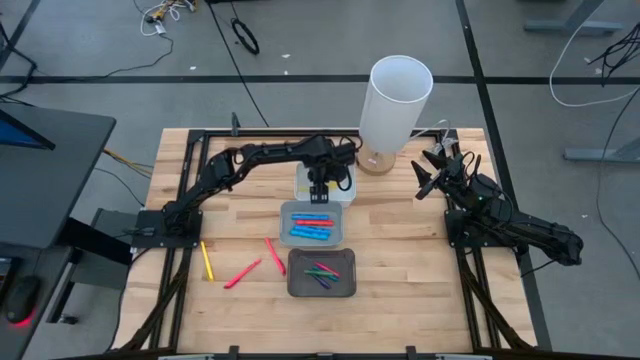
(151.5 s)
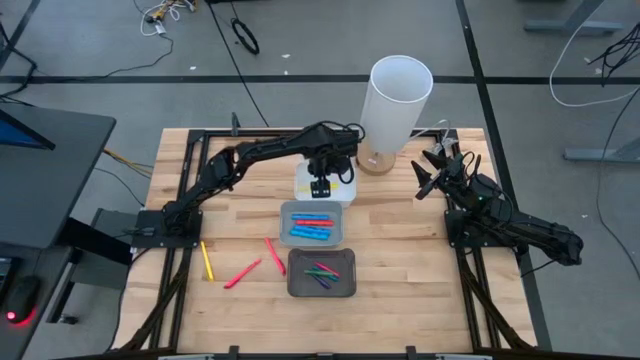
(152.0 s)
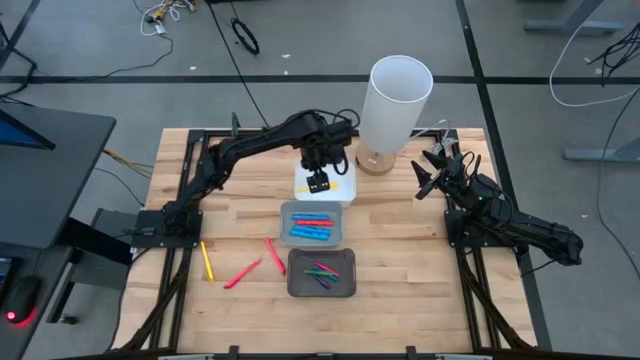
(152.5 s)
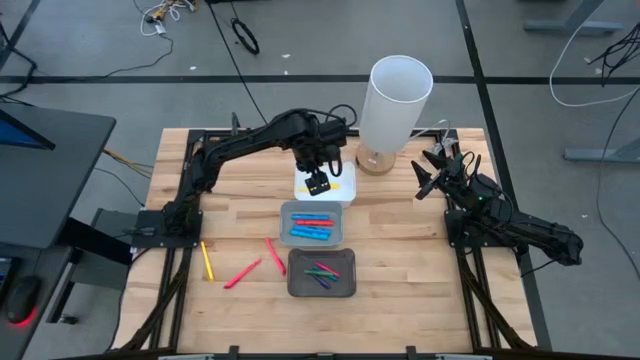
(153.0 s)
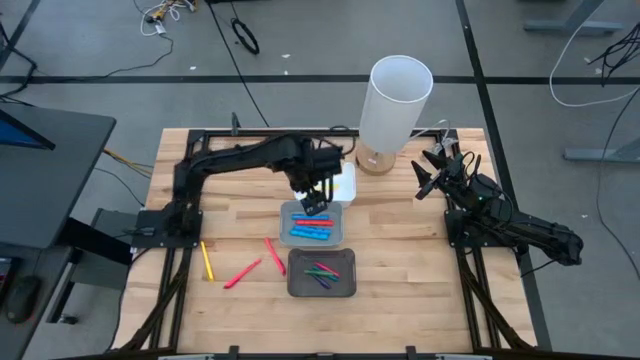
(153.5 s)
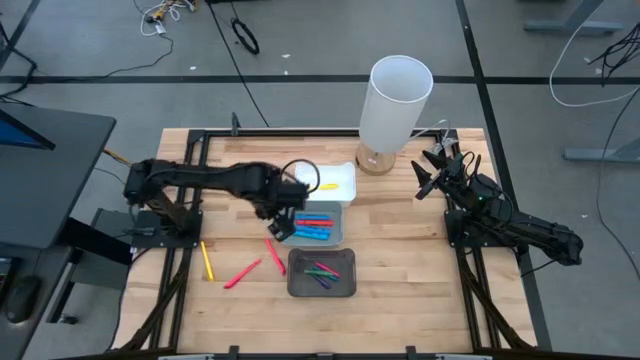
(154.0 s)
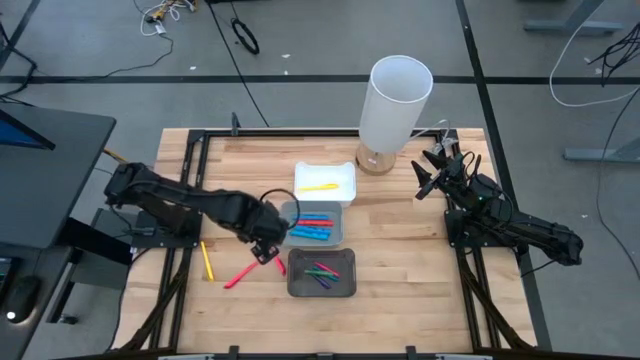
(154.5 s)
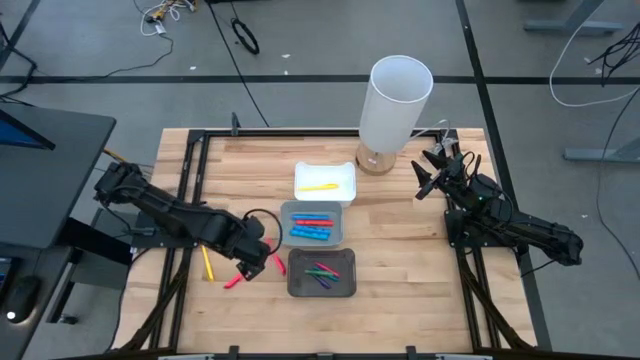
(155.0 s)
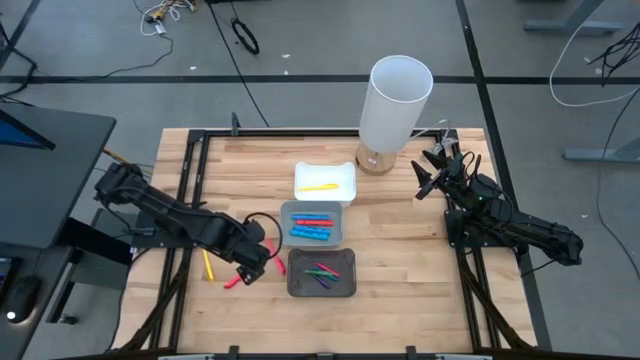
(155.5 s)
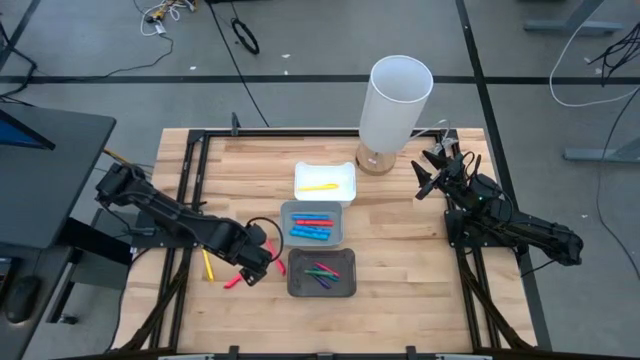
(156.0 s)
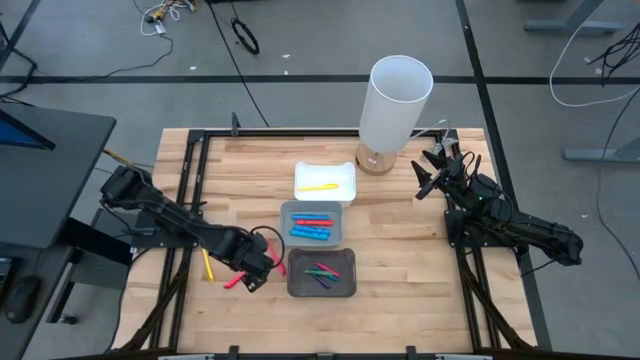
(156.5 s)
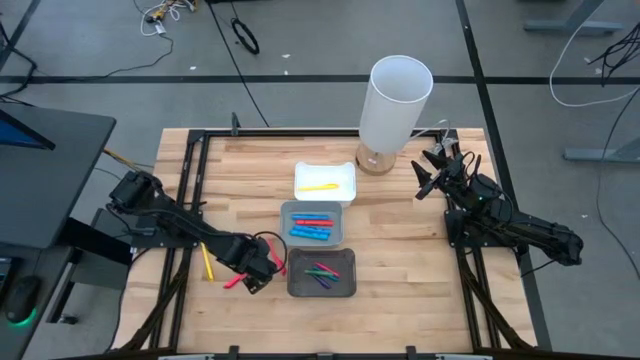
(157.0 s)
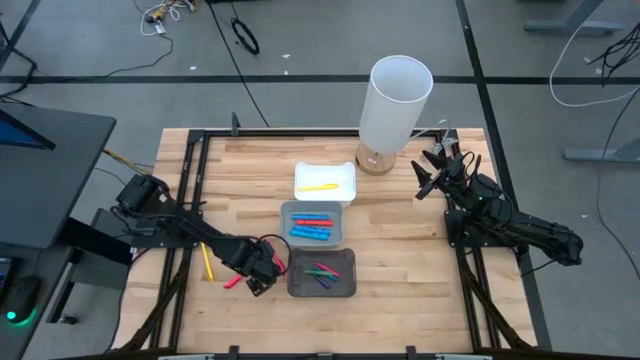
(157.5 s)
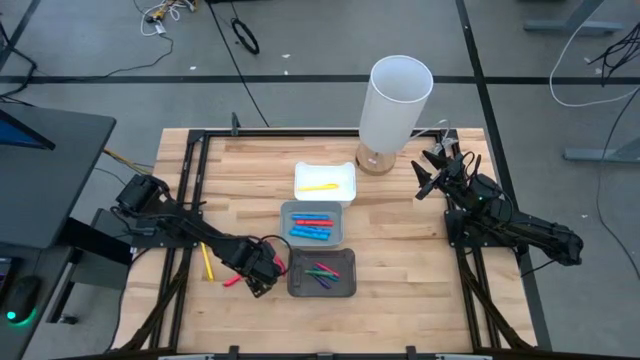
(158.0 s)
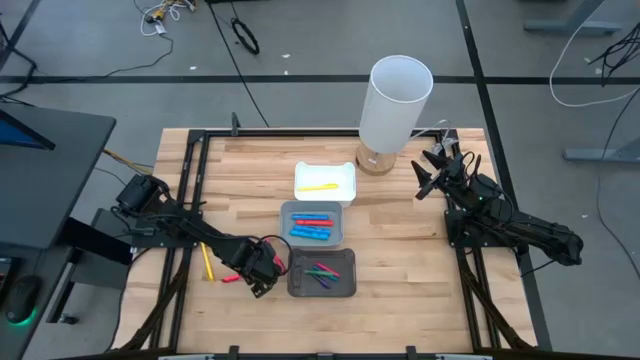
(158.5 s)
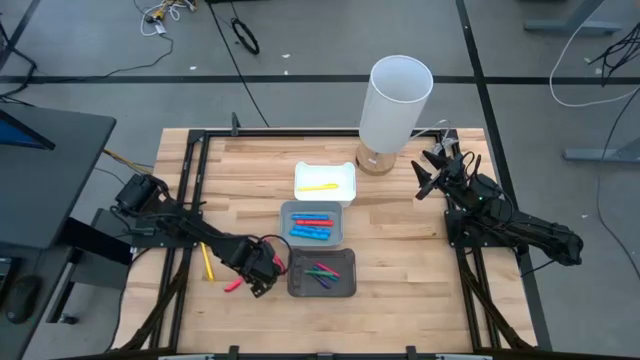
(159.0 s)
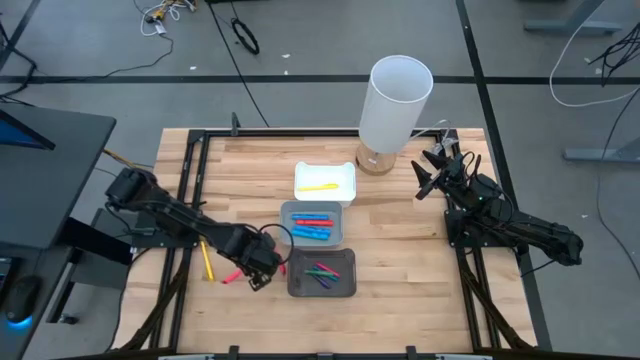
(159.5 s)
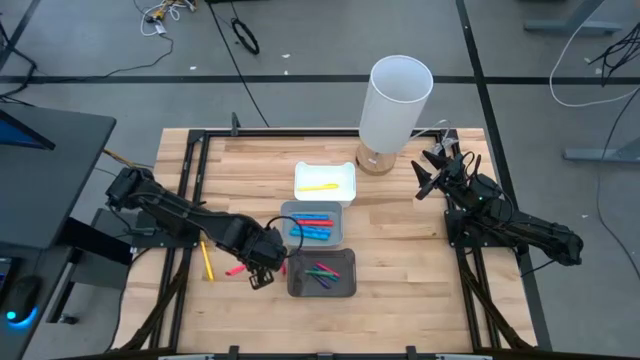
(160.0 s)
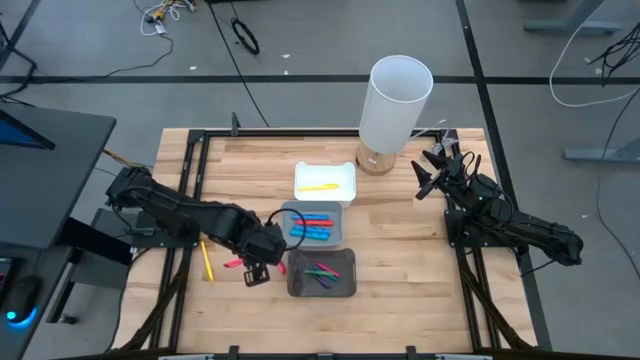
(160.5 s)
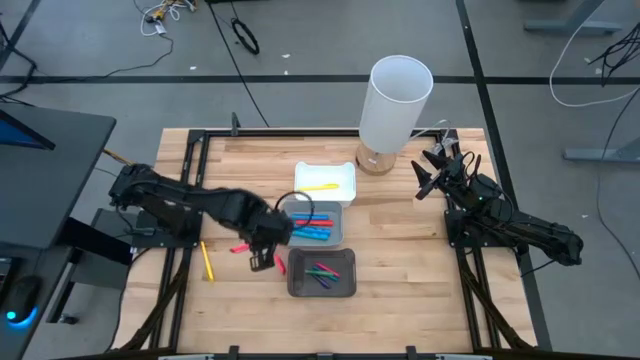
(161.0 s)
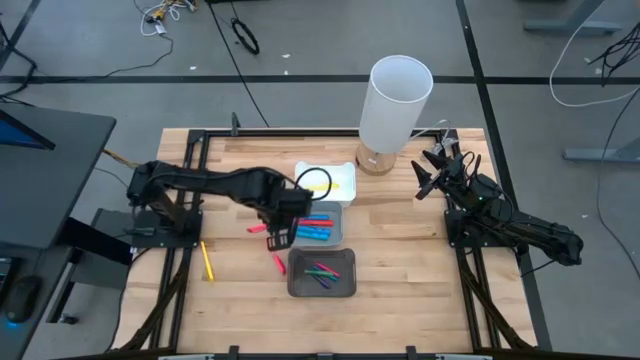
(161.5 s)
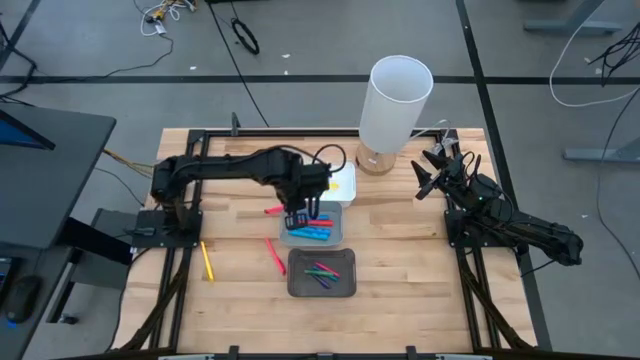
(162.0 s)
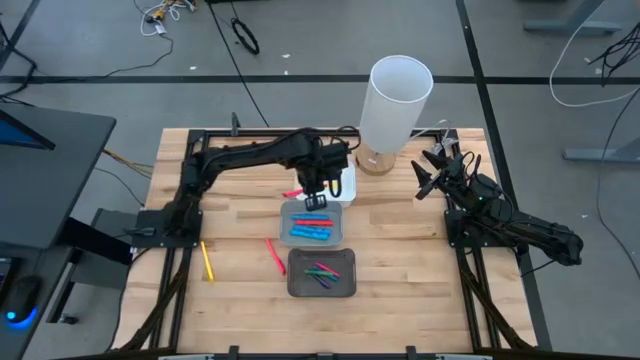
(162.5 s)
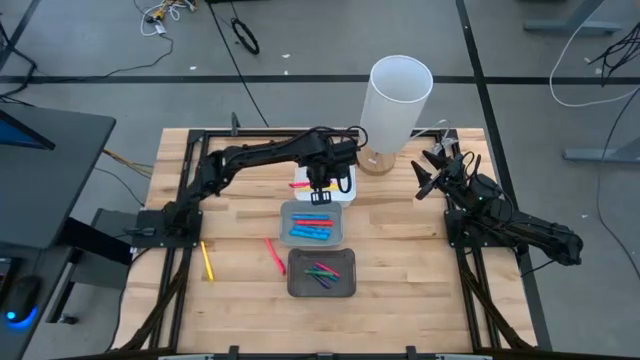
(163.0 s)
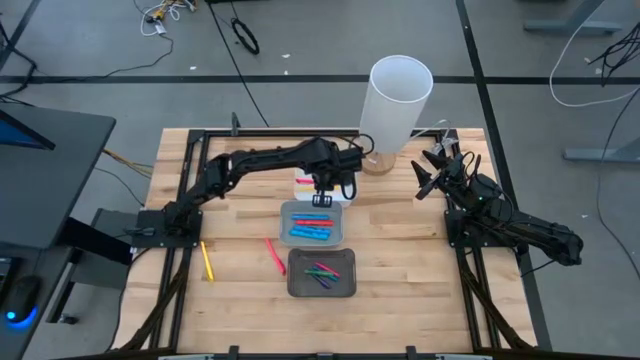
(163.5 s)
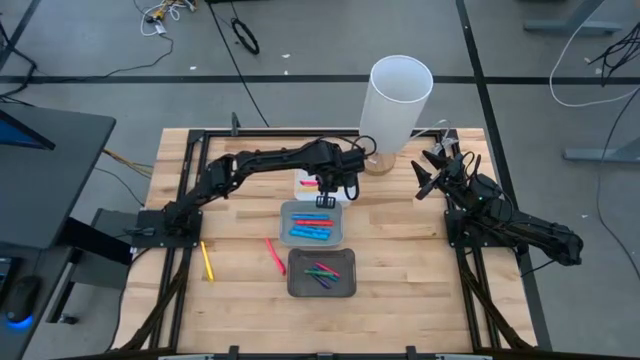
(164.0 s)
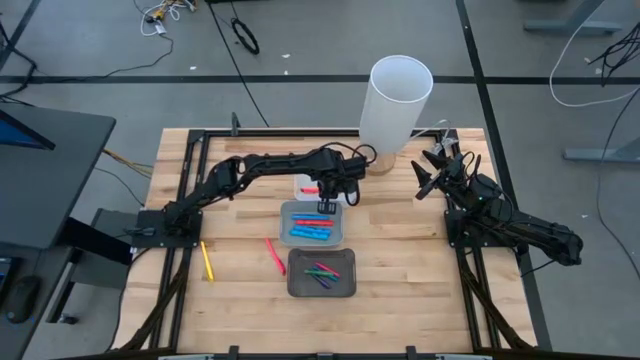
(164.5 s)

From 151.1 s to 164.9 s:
Task: Pick & Place Markers
Put the left pink marker pen into the white bin

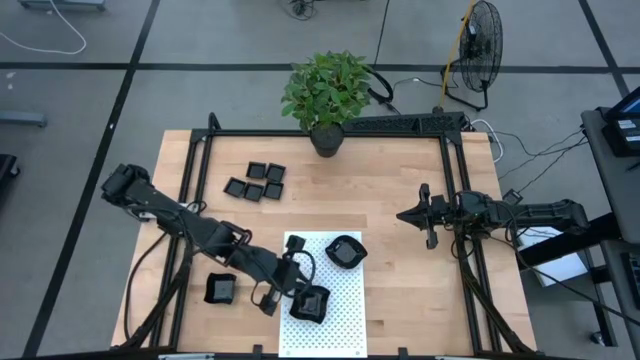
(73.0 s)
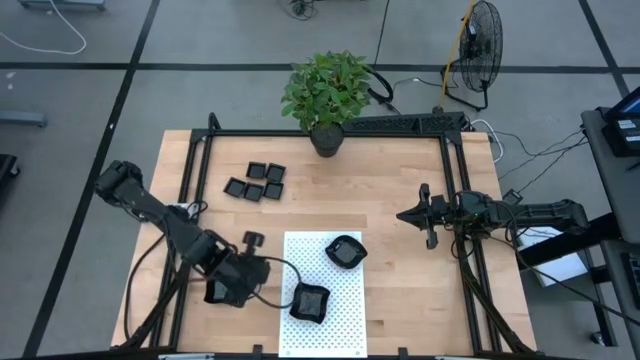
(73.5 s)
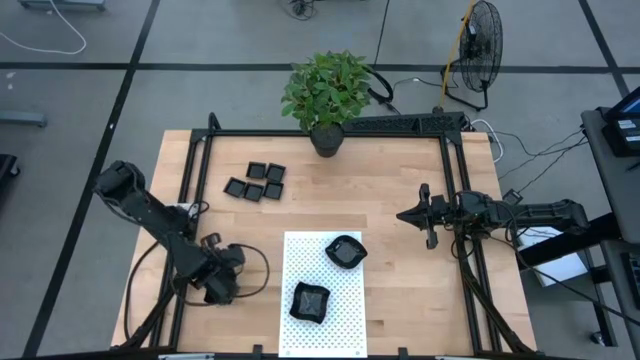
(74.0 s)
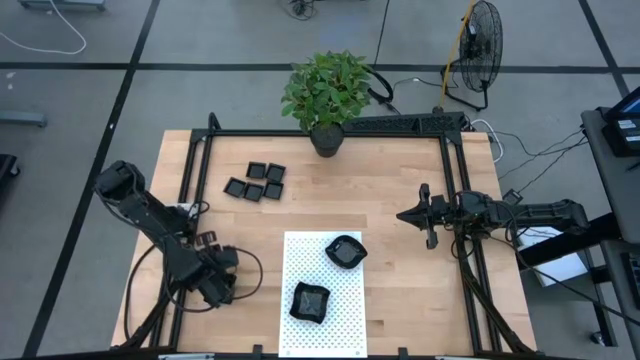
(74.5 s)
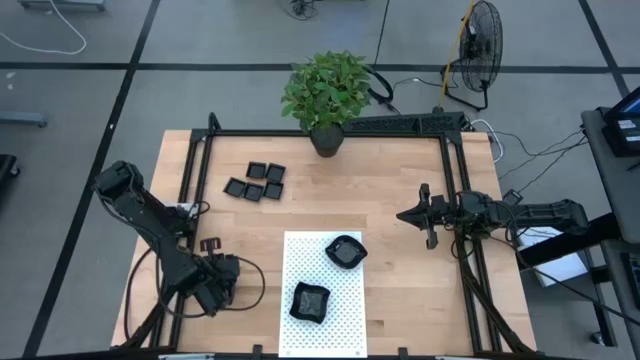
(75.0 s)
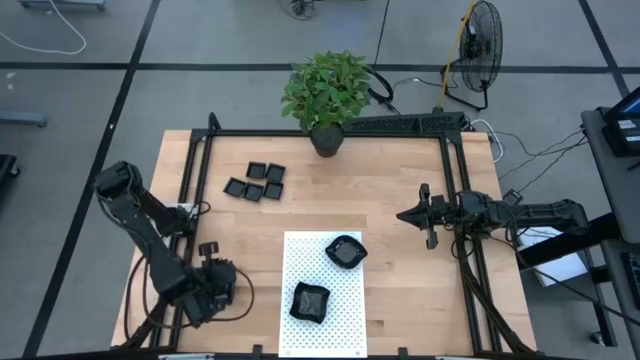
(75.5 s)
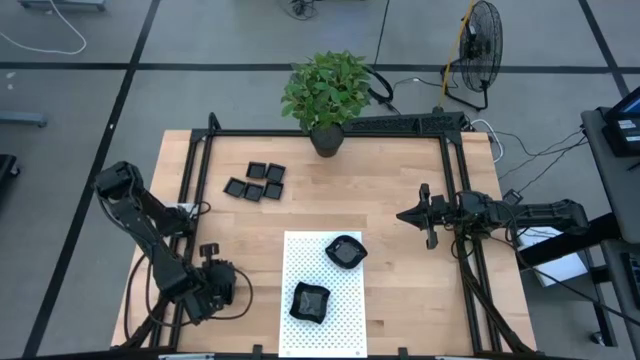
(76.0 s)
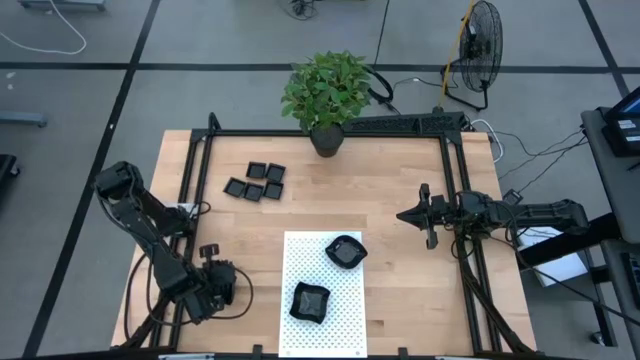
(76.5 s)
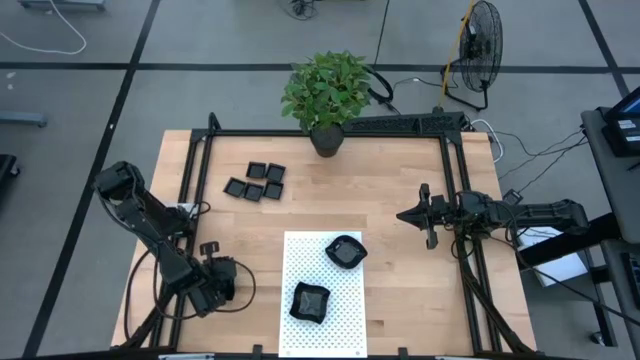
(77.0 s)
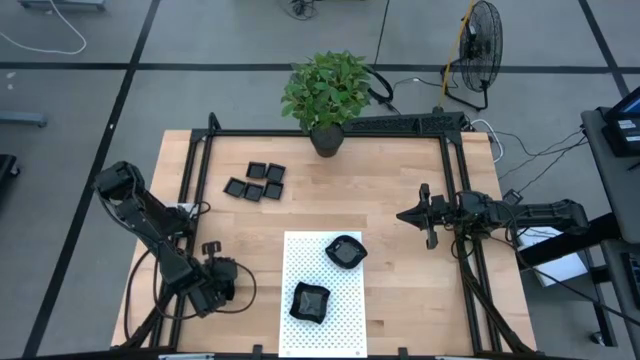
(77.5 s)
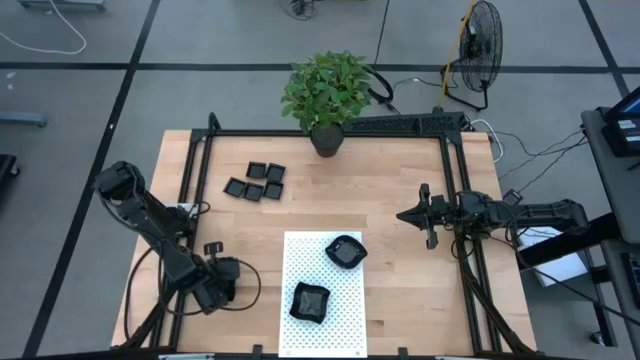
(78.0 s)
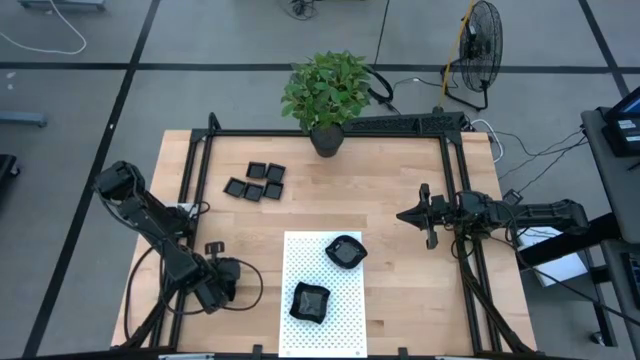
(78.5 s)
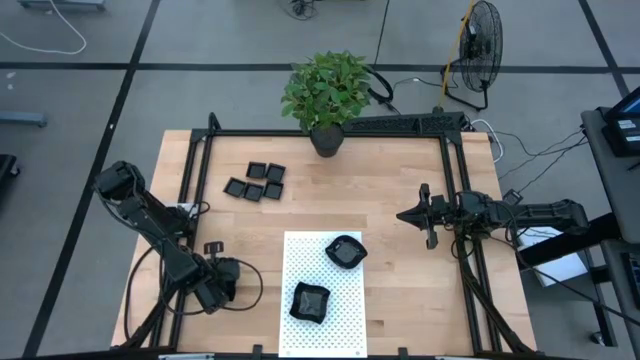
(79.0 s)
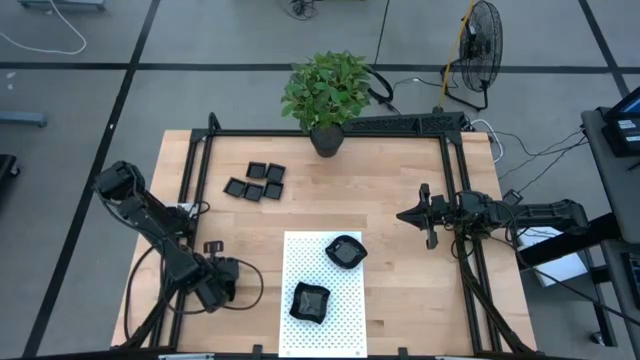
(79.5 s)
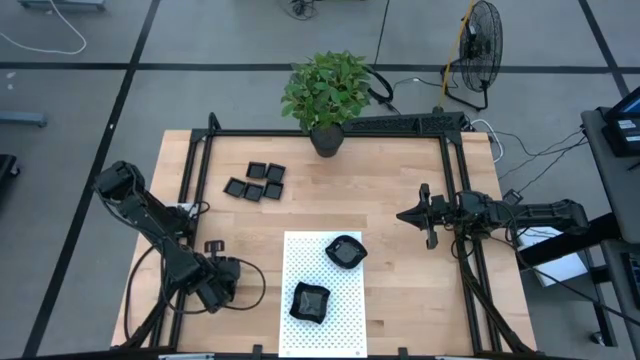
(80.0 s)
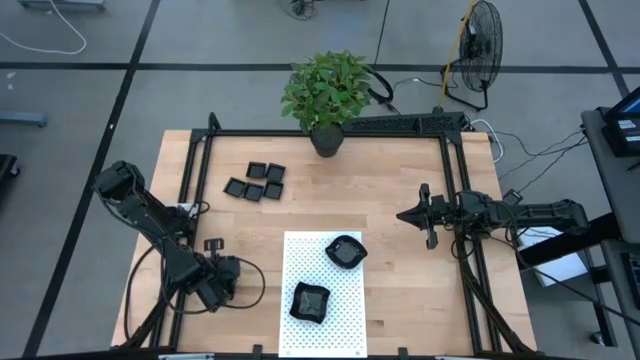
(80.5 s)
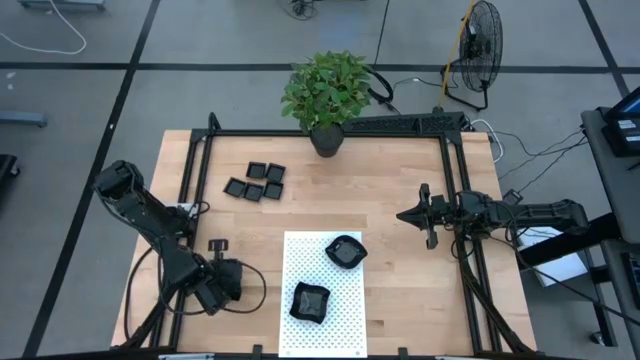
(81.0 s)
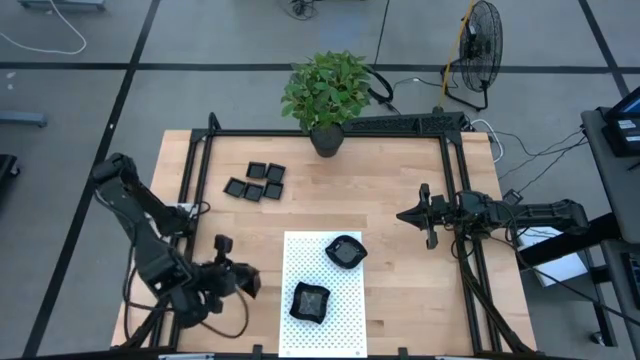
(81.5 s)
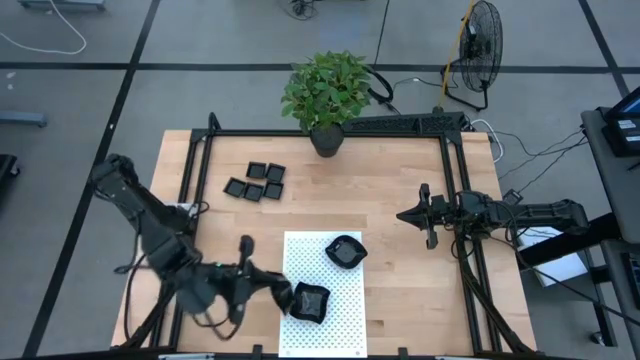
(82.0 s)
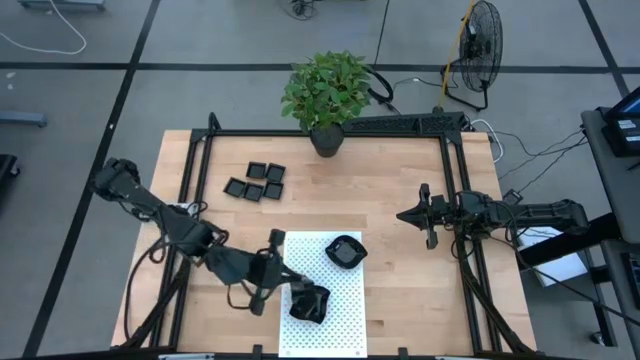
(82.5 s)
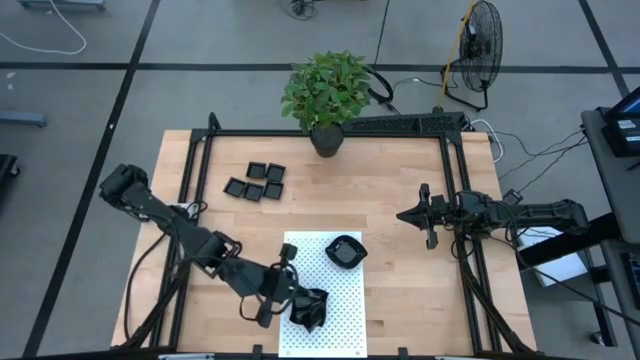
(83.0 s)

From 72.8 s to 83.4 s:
Task: Pick & Place Mini shaped plates
Stack the distorted square plate on top of the distorted square plate on the shelf
